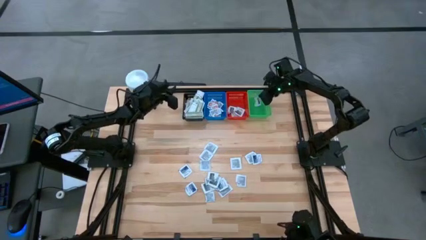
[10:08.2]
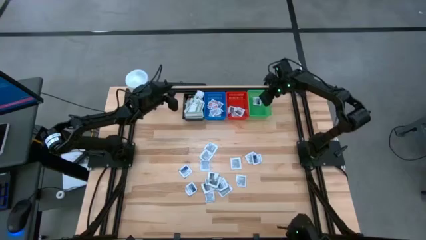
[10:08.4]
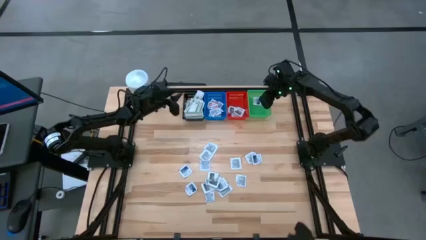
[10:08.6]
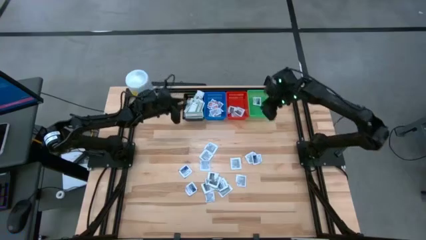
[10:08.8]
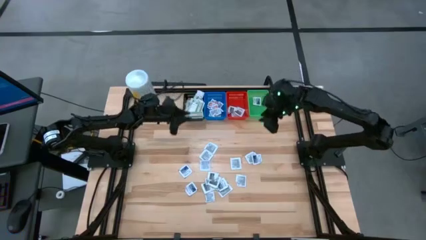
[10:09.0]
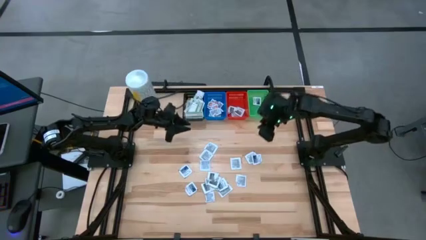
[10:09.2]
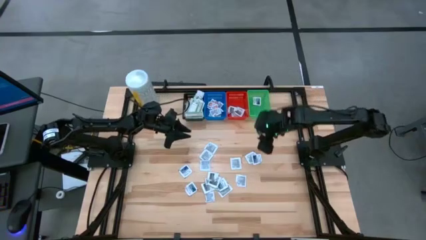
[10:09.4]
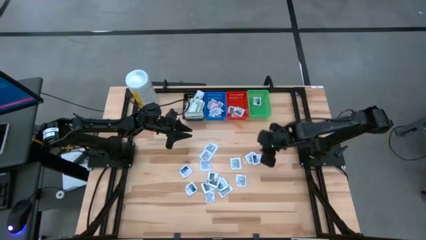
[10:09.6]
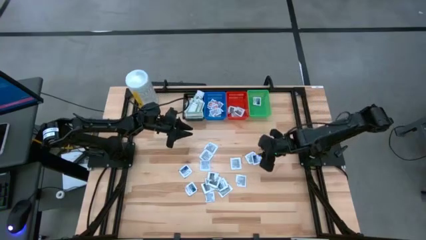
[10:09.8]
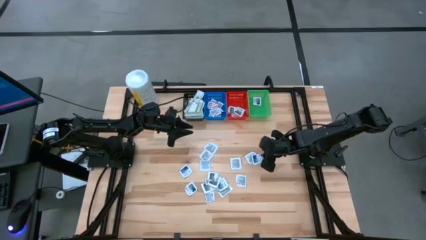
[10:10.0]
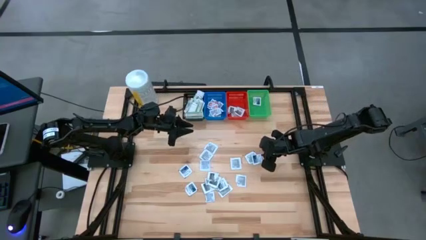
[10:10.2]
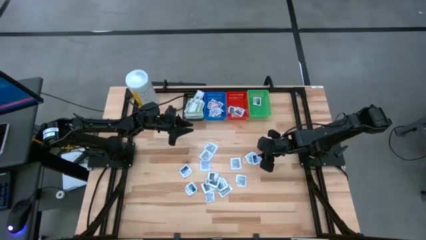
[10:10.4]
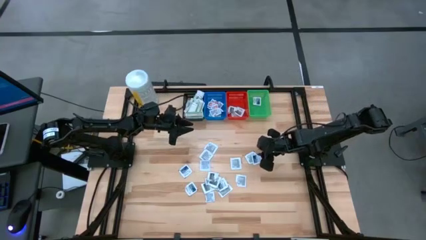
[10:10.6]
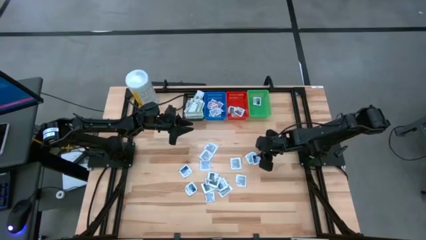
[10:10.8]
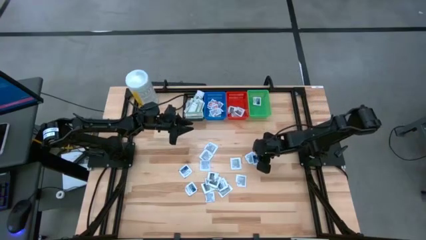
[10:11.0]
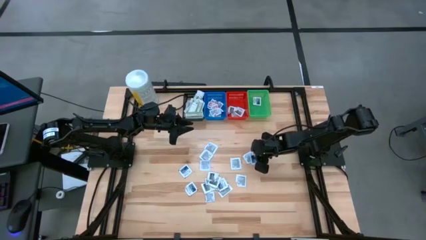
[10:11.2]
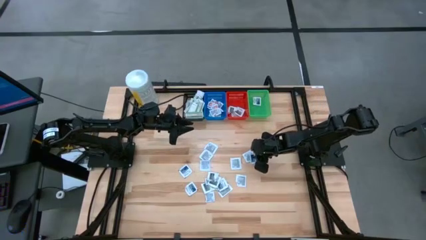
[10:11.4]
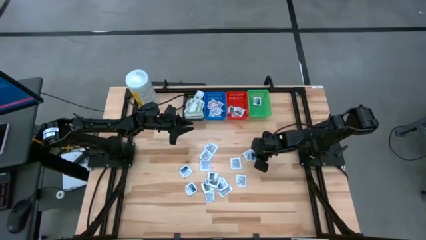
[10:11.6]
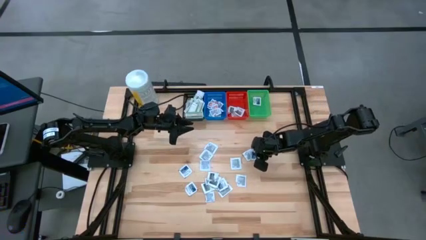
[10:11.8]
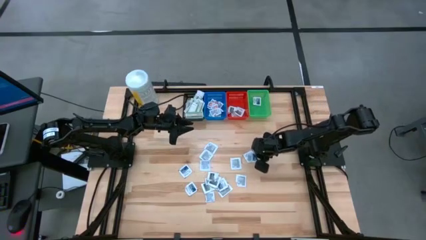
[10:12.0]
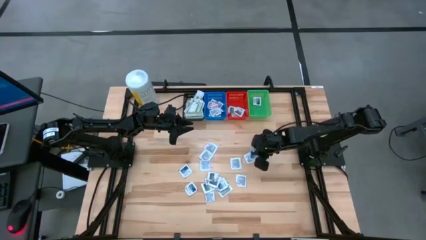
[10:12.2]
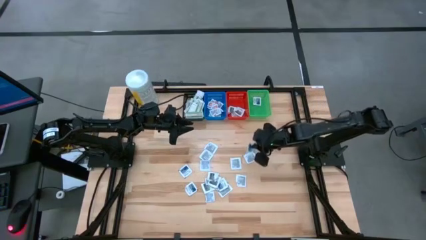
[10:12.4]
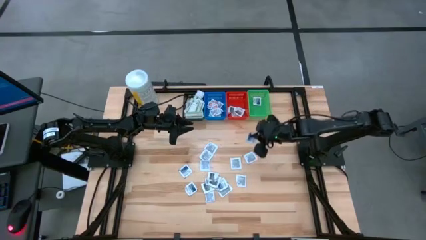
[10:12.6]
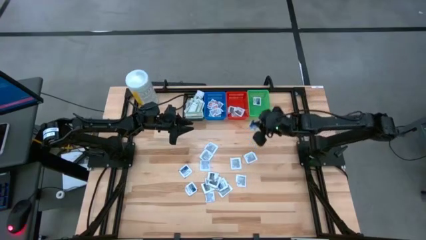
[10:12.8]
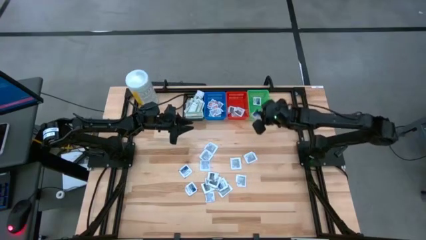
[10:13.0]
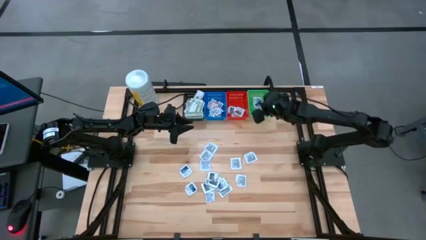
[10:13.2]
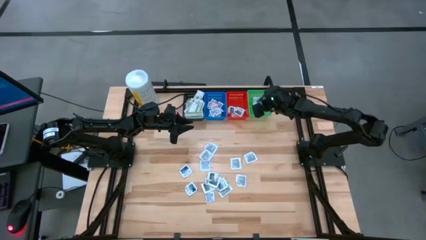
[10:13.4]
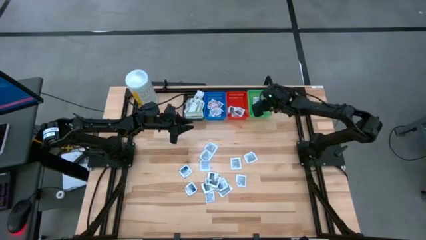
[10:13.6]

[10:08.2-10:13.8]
Task: Pick & Place First Aid Supplies
Put the blue alcohol pad in the green bin

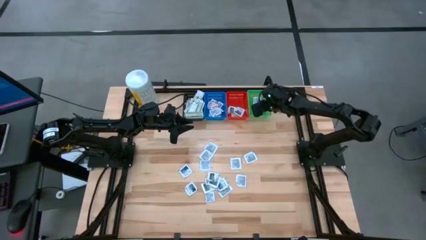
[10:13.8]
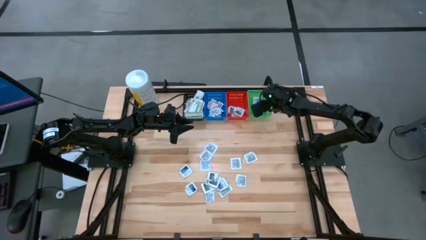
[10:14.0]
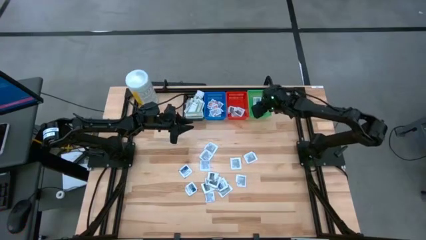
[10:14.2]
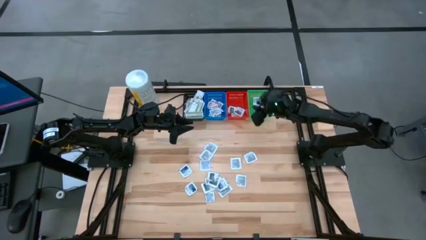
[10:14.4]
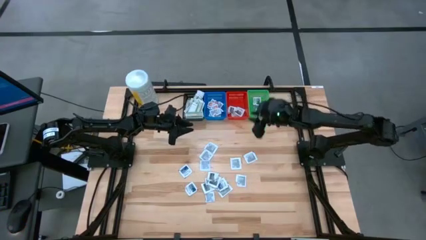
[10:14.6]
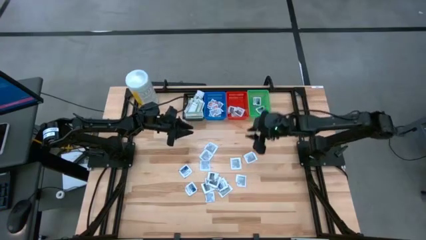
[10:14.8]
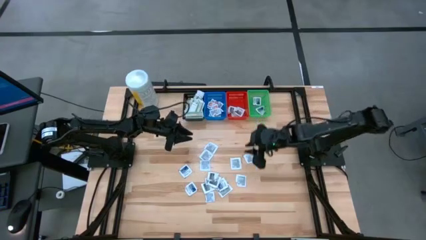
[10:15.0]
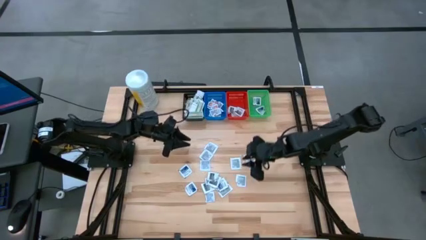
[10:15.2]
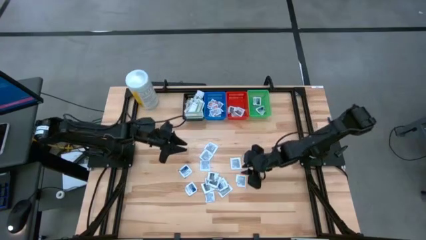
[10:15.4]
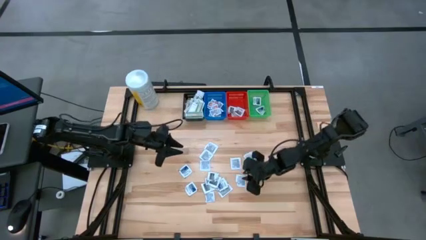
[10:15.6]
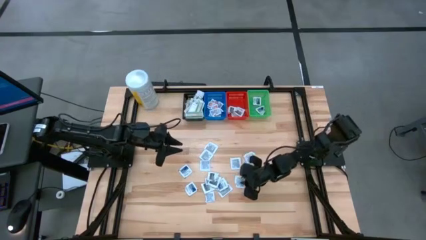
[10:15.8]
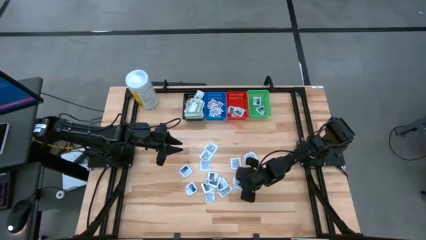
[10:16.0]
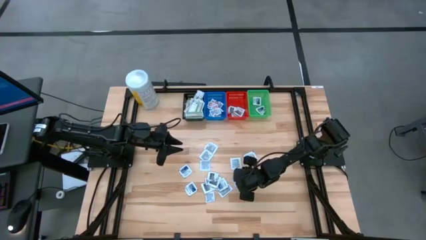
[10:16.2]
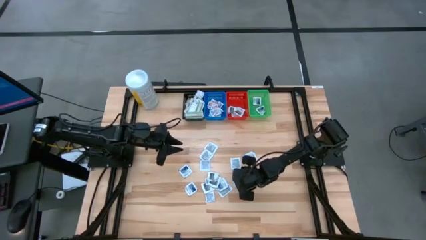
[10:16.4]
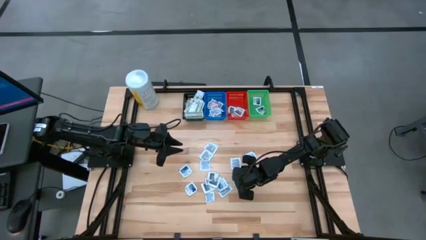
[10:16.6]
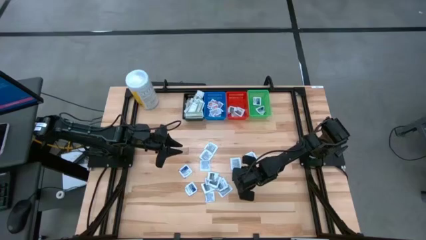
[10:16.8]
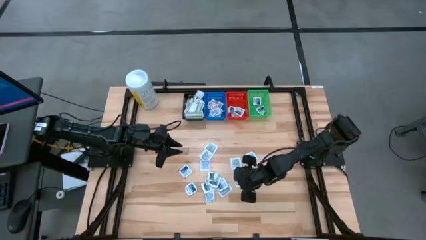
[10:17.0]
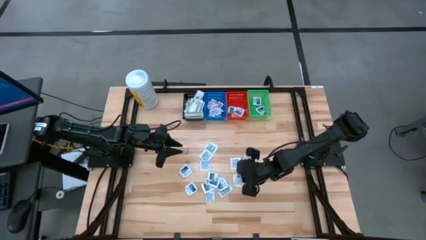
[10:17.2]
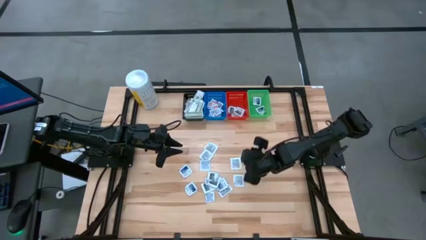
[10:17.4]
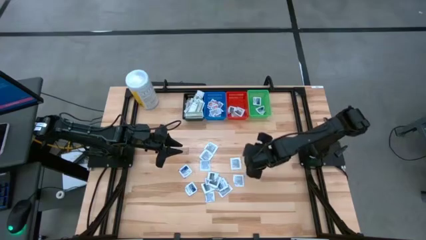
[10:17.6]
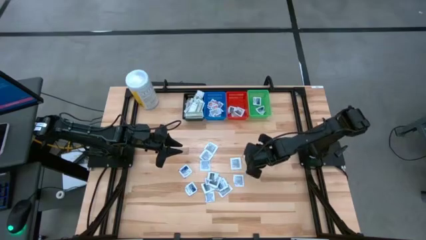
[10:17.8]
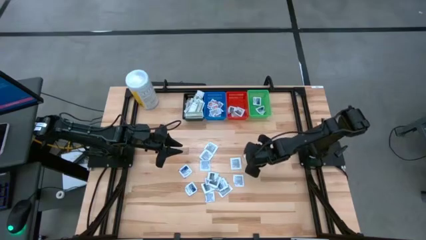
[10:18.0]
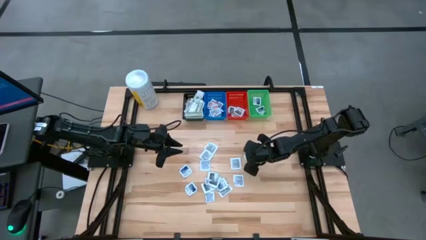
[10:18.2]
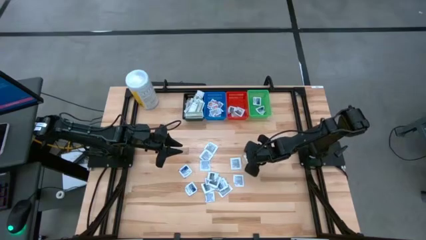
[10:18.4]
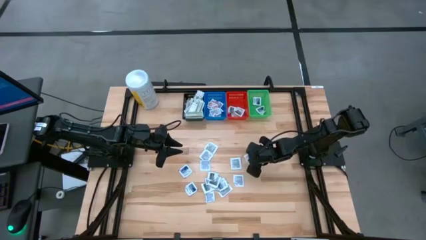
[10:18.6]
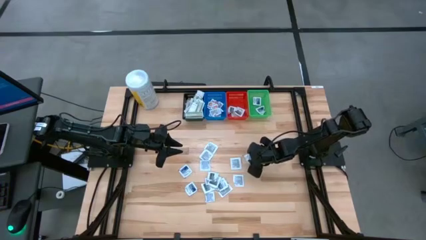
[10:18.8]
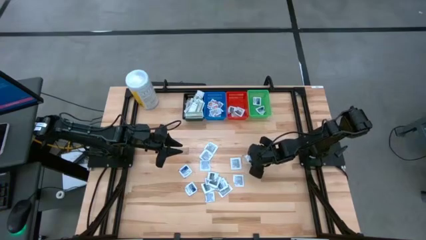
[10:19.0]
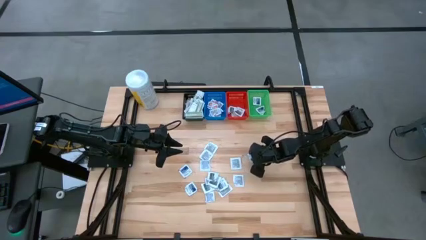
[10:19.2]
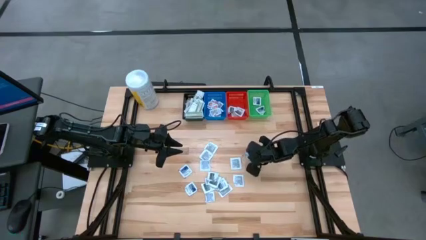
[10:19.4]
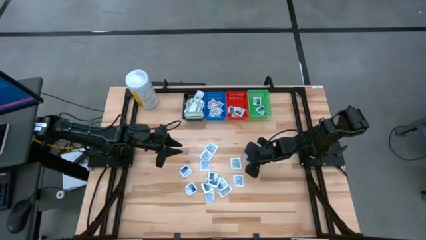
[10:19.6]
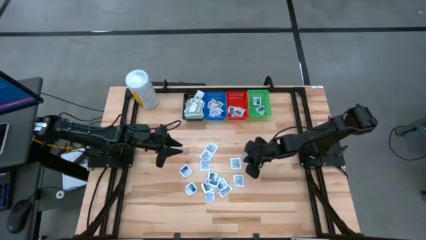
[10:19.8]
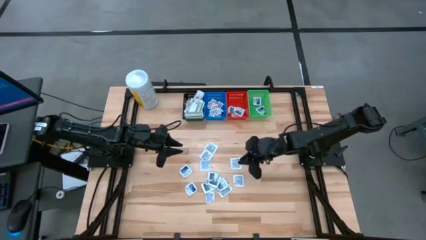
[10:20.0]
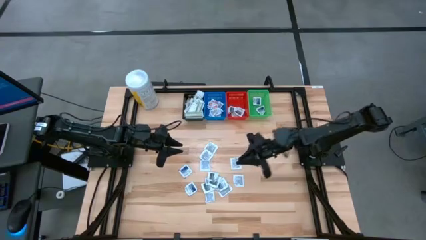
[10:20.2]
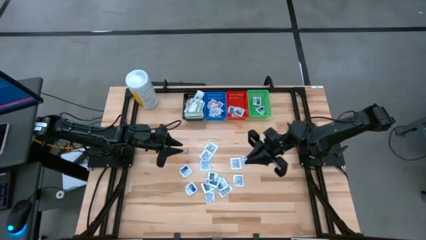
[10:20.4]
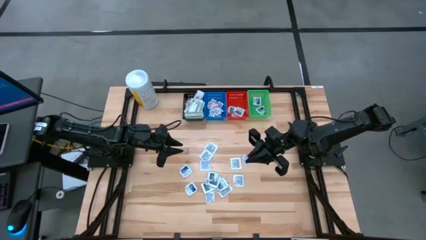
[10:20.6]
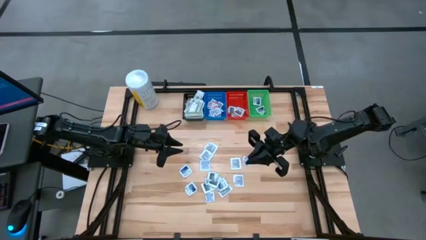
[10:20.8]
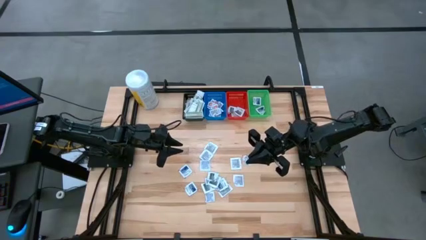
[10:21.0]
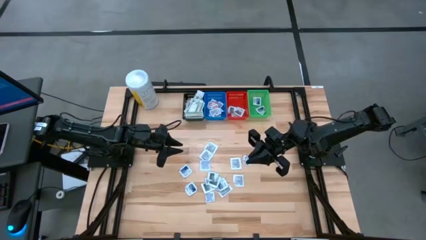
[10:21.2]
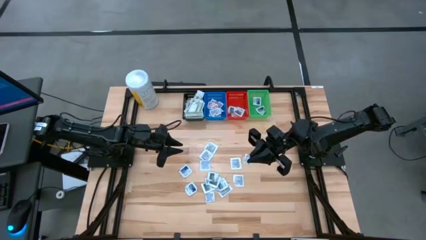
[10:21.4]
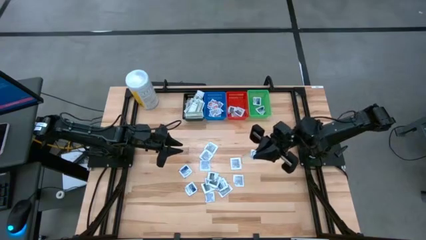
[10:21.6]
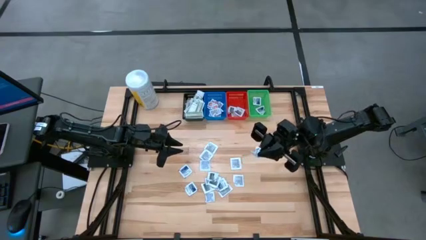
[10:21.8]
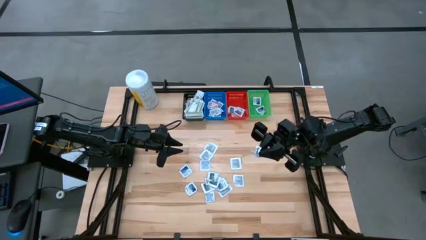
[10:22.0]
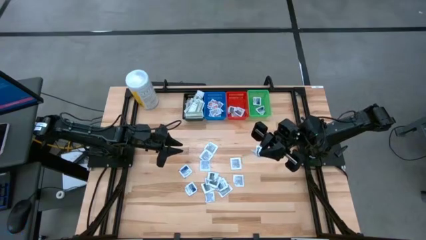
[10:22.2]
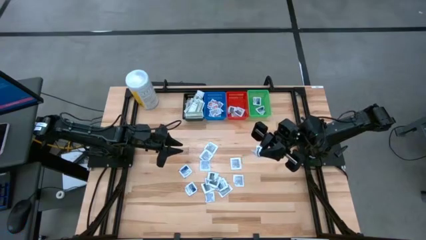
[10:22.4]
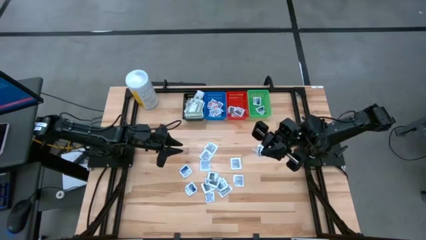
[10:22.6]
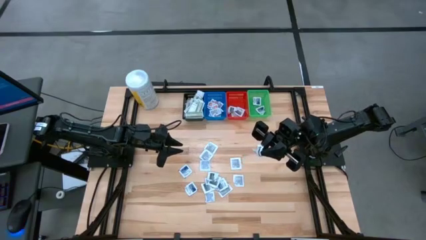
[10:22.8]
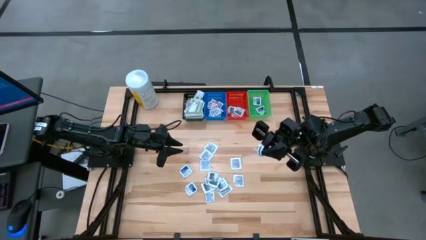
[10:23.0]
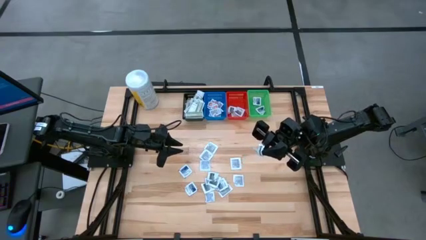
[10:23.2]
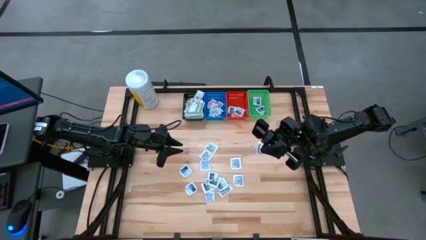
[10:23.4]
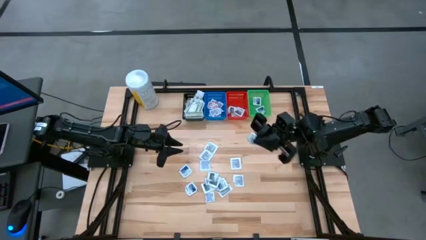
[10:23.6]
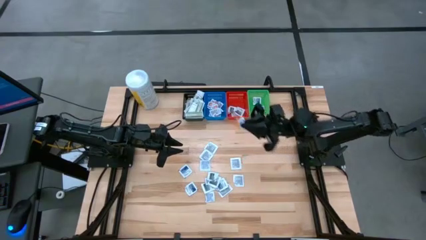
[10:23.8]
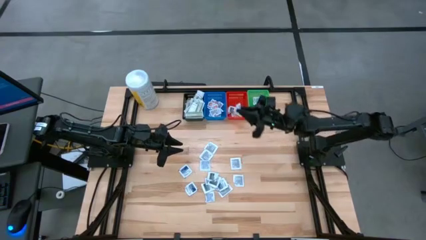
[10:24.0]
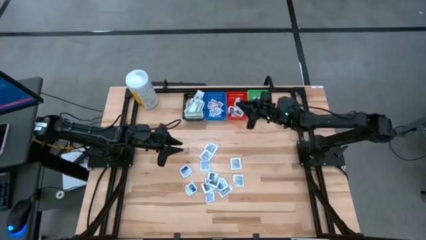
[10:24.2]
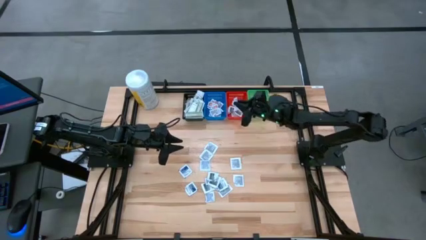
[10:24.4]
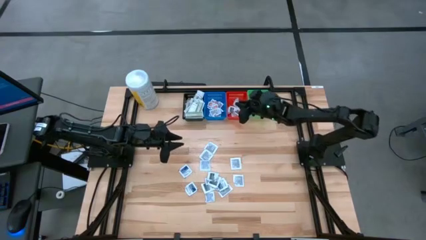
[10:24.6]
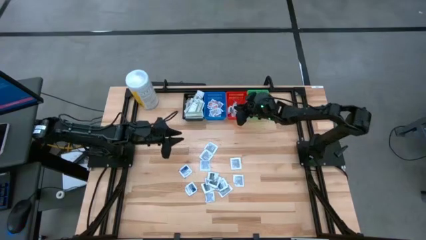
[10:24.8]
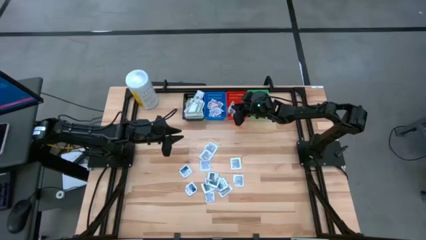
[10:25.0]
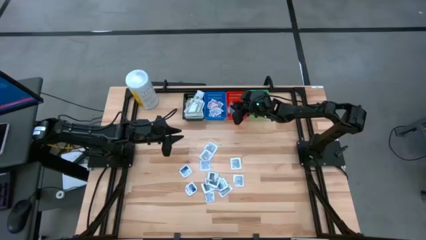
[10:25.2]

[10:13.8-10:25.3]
Put the gray towelette pack in the red bin
